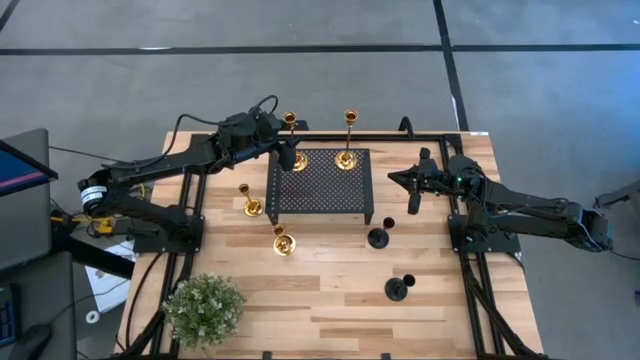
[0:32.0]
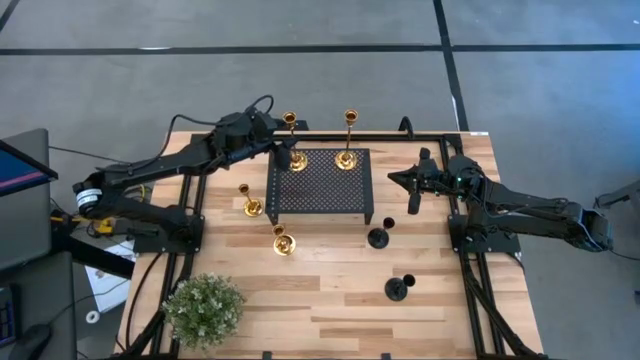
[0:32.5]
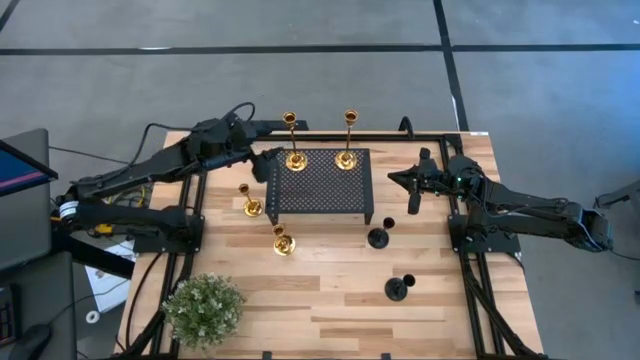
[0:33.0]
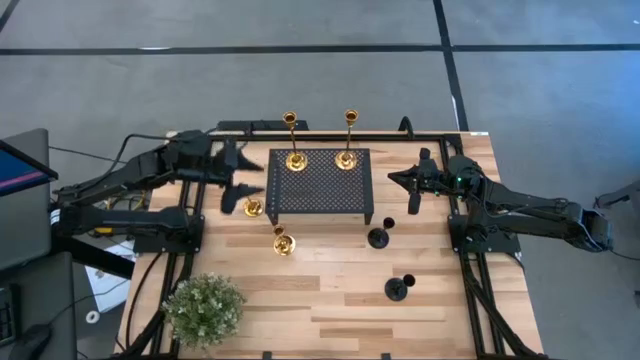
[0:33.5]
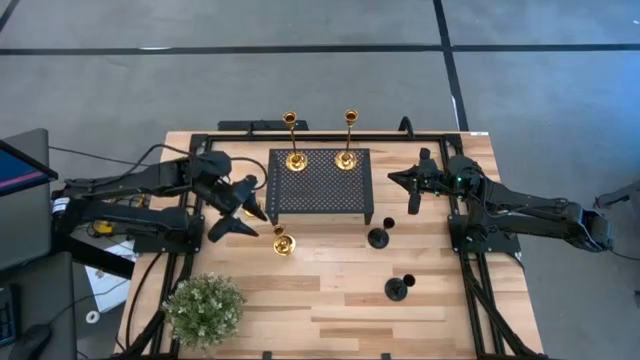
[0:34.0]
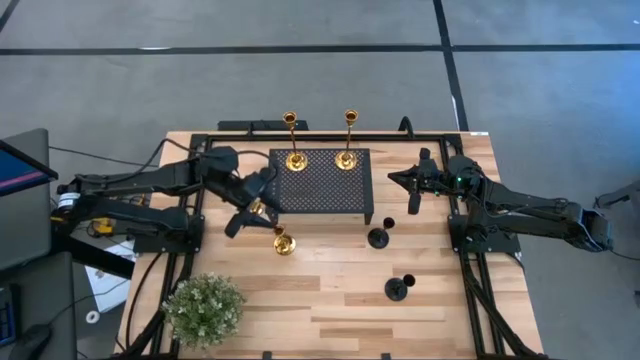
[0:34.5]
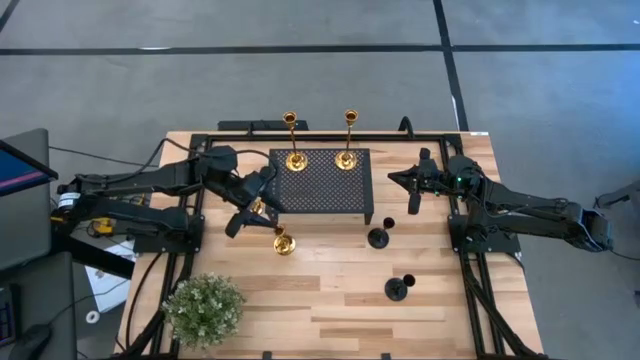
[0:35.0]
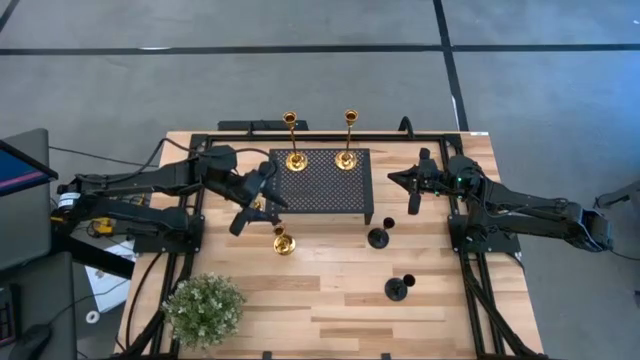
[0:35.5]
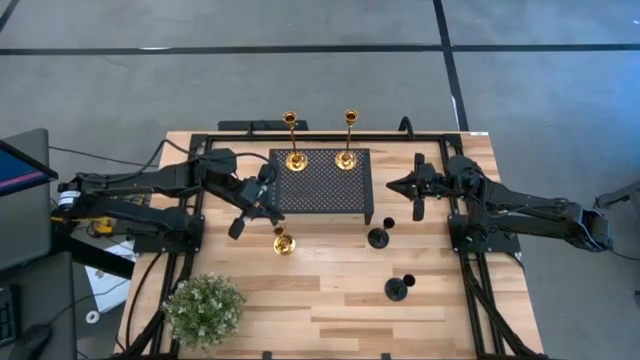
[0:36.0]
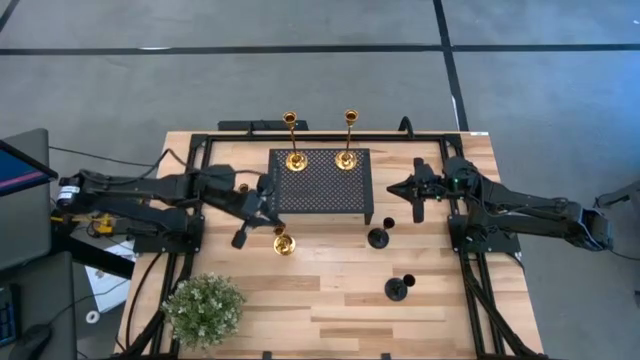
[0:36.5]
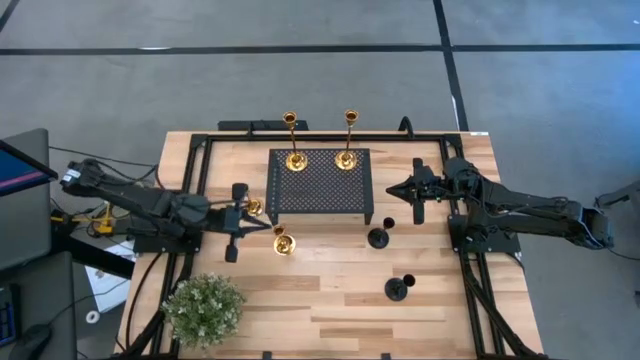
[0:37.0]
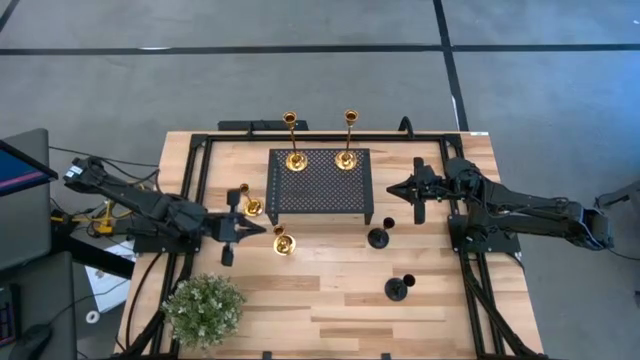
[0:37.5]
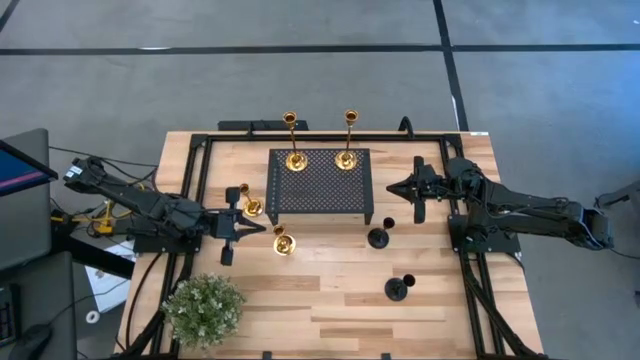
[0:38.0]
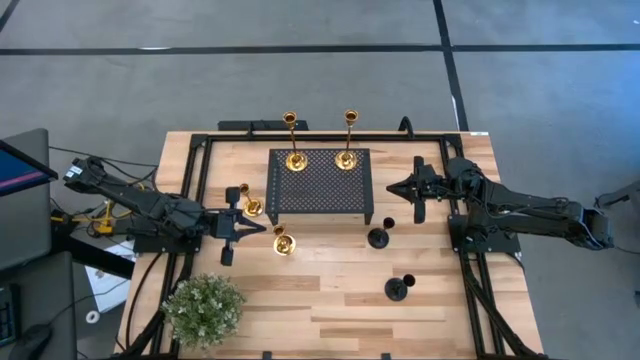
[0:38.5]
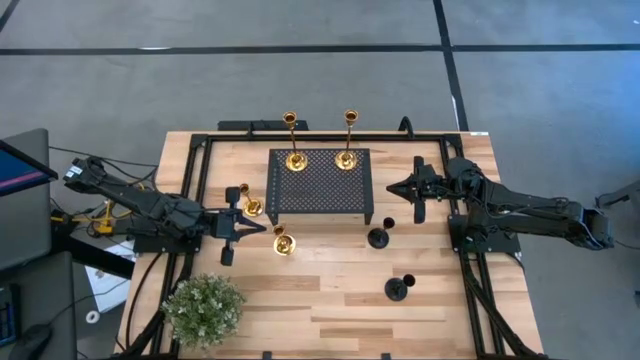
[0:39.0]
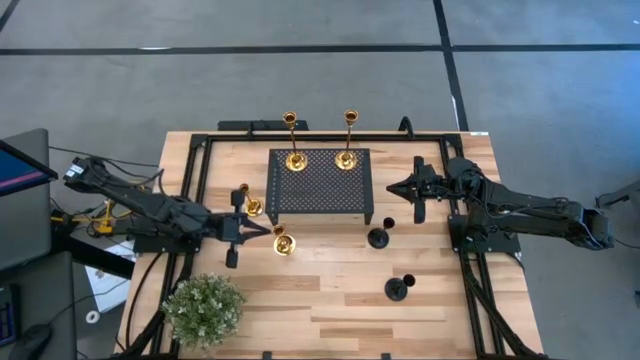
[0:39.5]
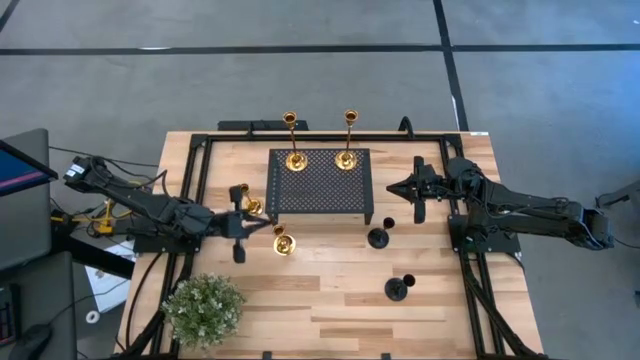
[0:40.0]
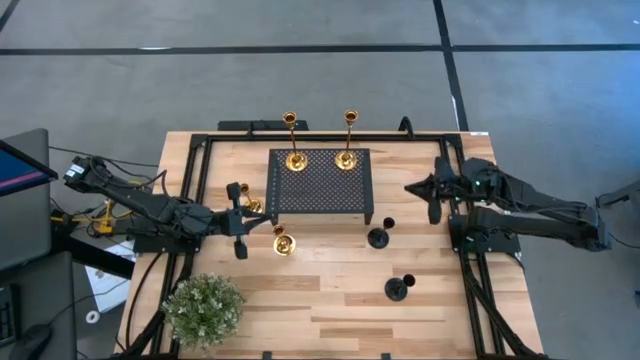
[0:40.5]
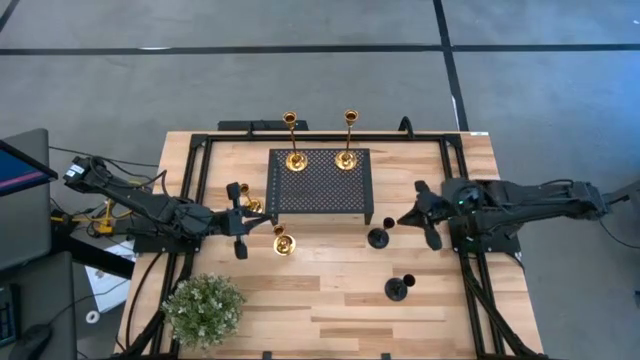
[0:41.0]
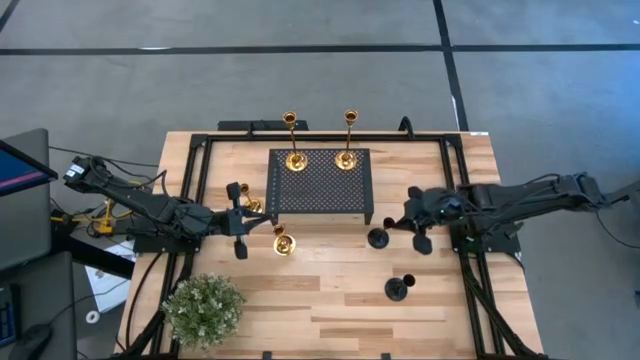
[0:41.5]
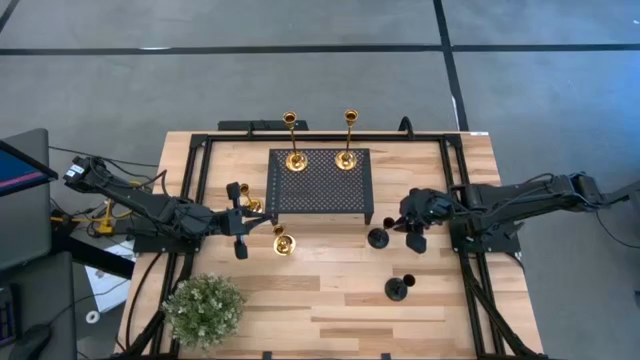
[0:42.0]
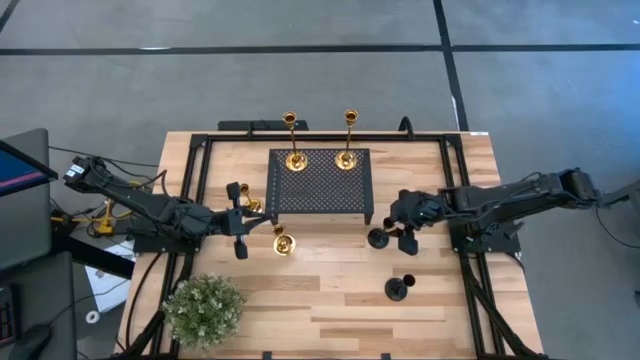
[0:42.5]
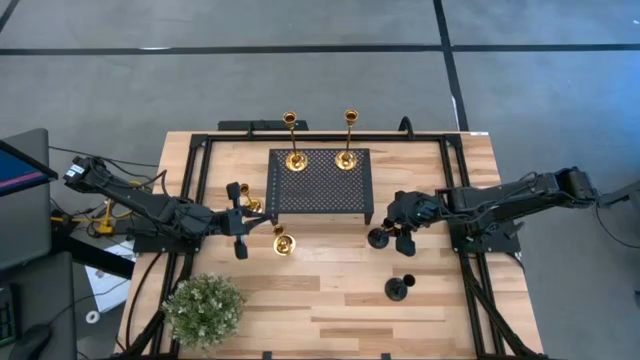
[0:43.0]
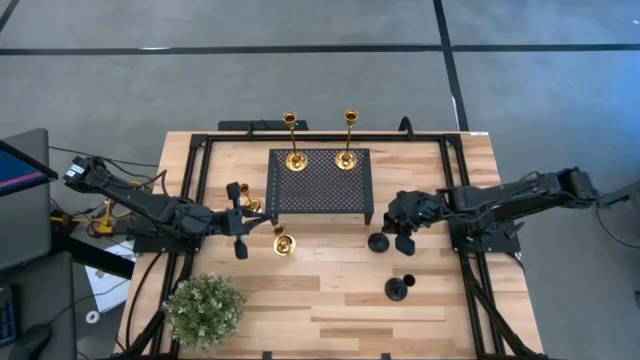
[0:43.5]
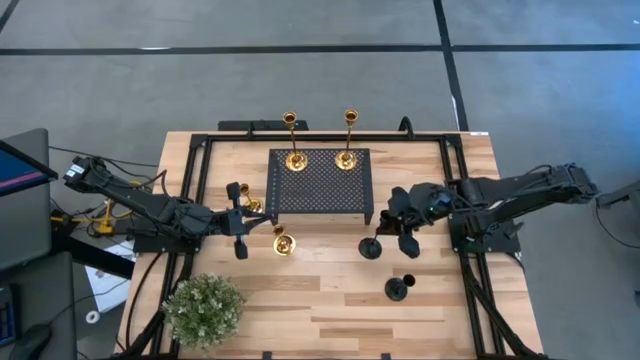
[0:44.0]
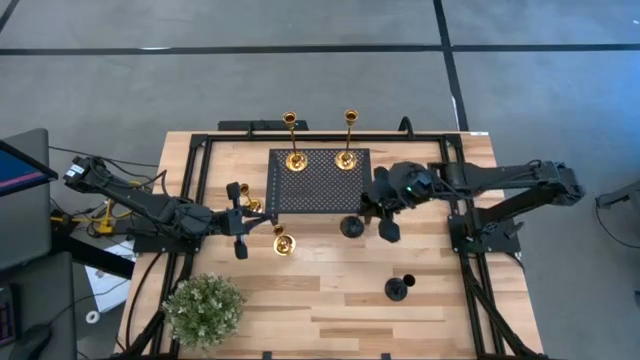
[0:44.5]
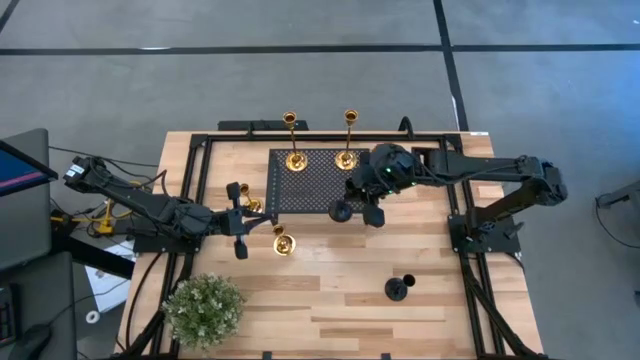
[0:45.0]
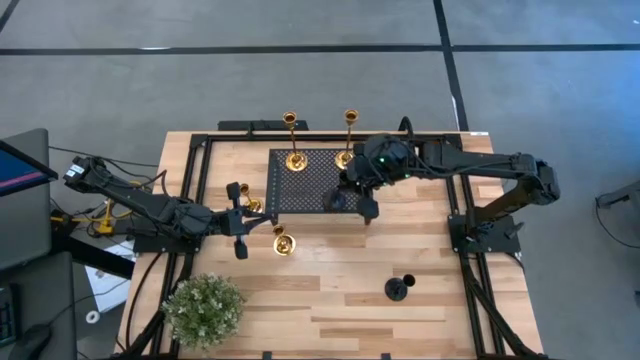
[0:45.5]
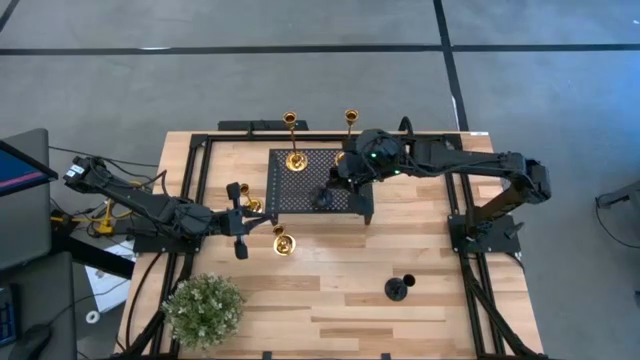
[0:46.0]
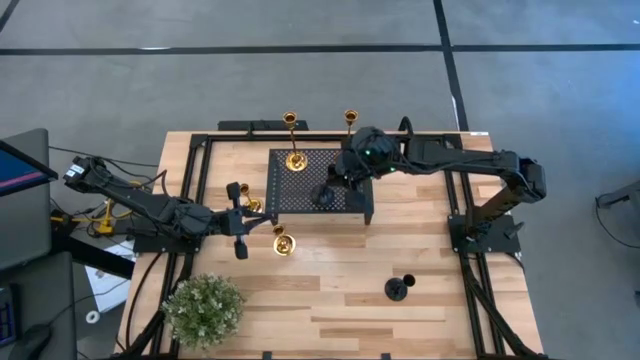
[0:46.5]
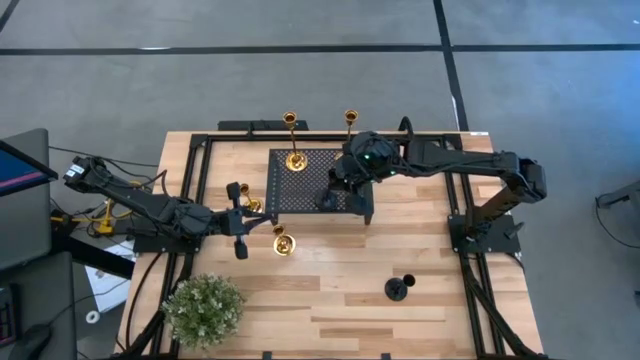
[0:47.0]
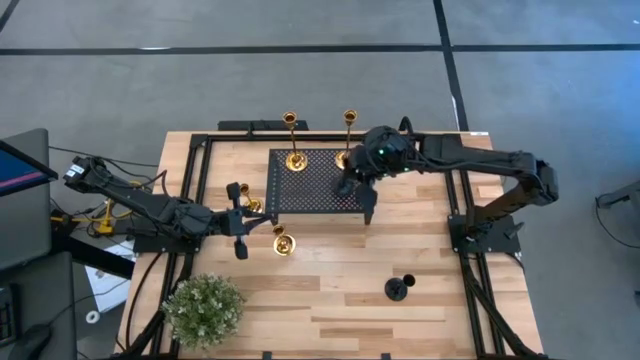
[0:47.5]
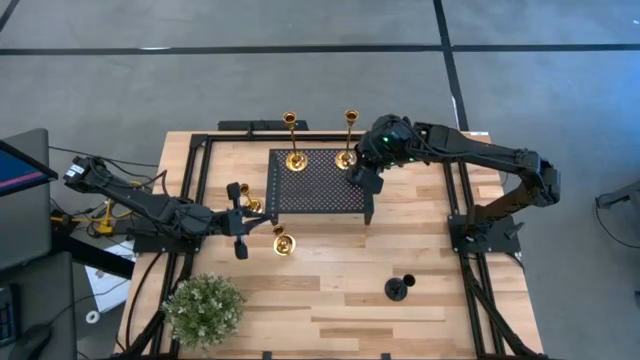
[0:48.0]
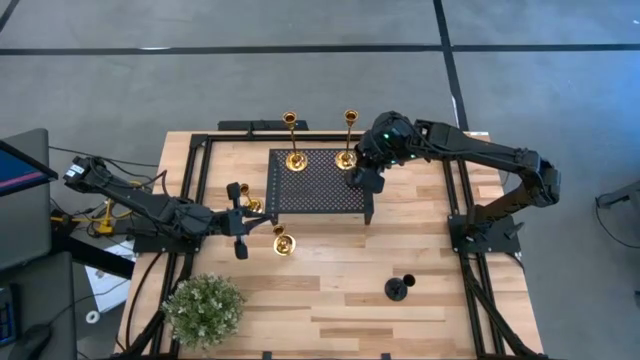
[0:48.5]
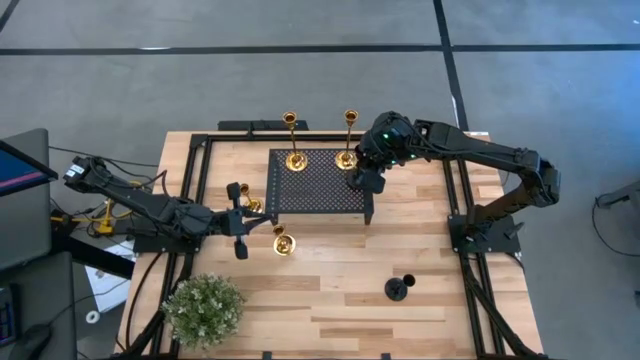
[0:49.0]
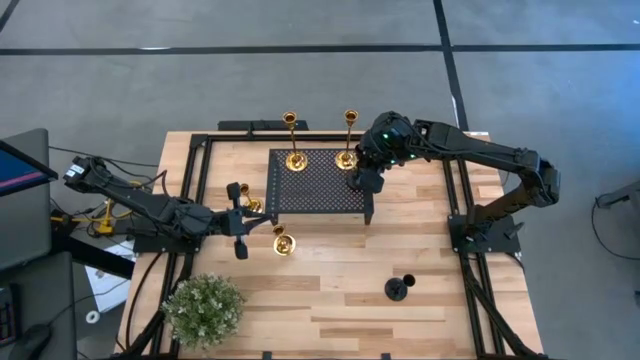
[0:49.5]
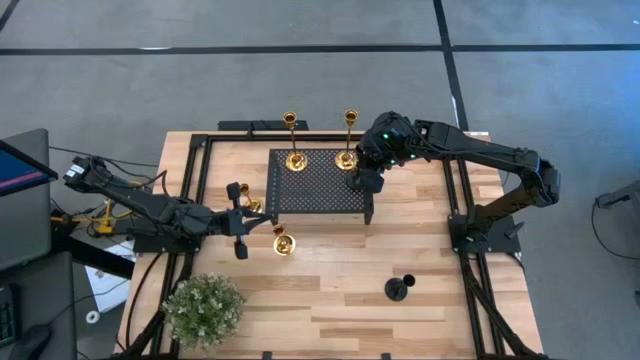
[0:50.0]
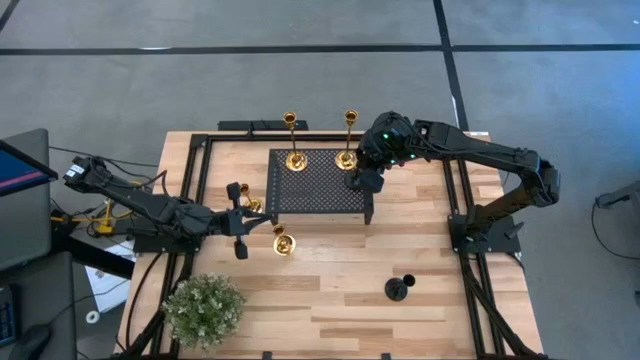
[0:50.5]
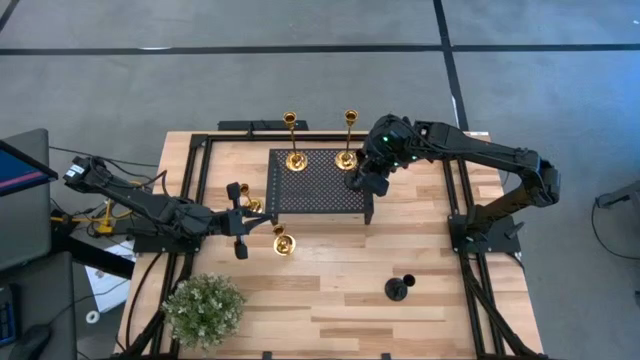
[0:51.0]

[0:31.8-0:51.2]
Task: Pick & Place candle stick holders
Put the black candle holder on the shelf
